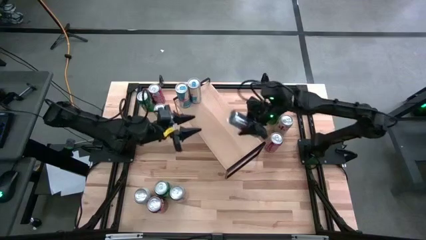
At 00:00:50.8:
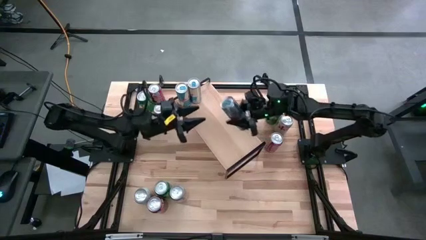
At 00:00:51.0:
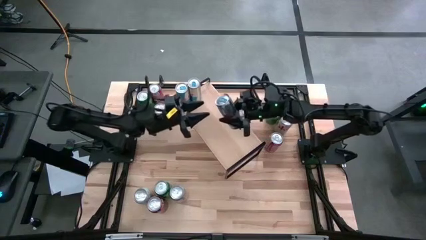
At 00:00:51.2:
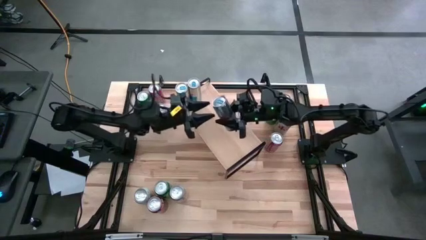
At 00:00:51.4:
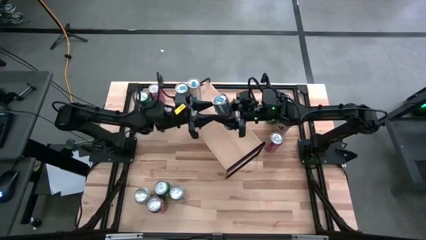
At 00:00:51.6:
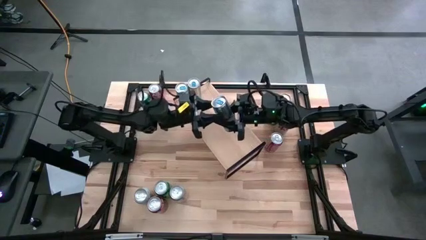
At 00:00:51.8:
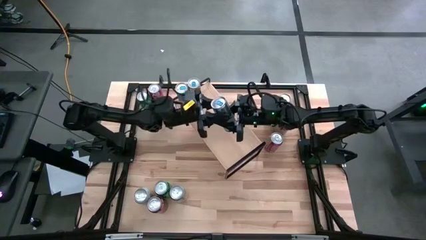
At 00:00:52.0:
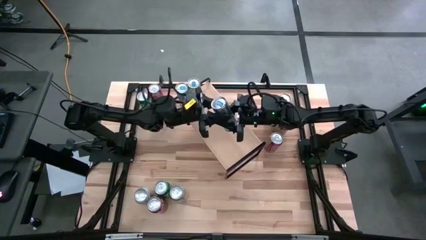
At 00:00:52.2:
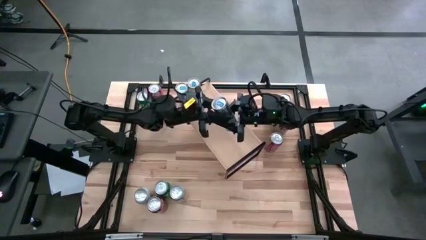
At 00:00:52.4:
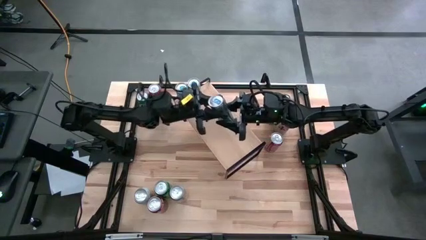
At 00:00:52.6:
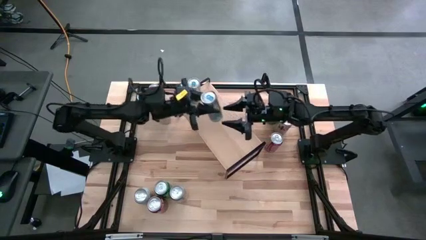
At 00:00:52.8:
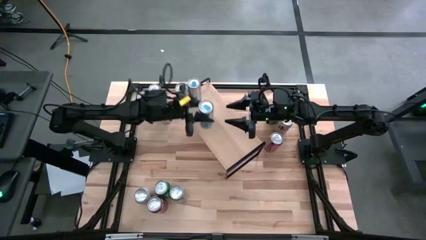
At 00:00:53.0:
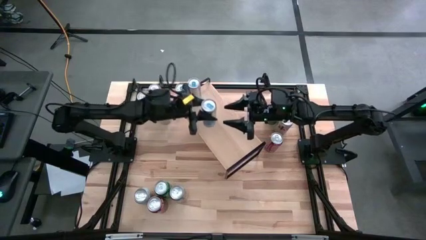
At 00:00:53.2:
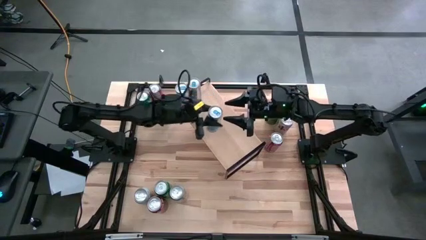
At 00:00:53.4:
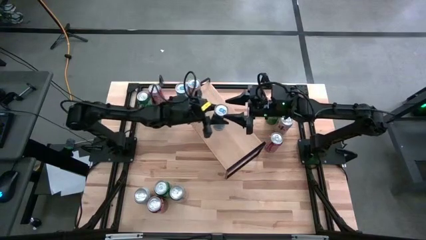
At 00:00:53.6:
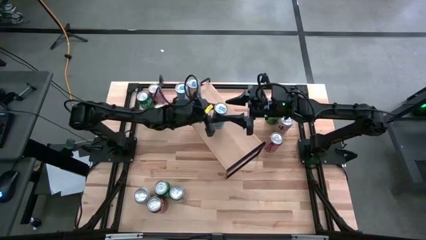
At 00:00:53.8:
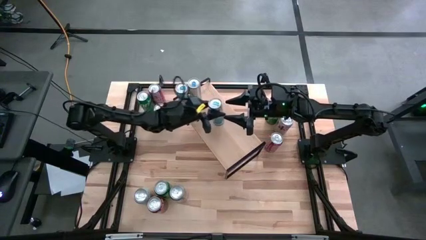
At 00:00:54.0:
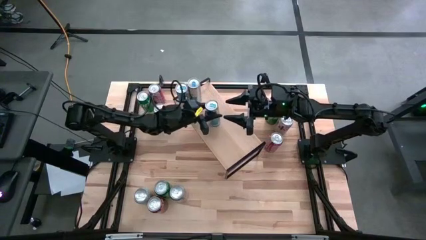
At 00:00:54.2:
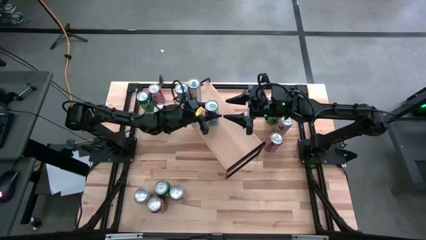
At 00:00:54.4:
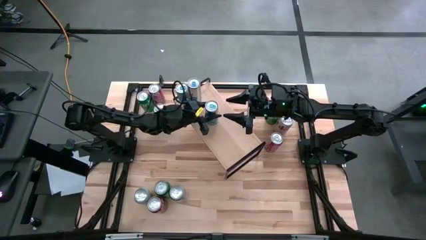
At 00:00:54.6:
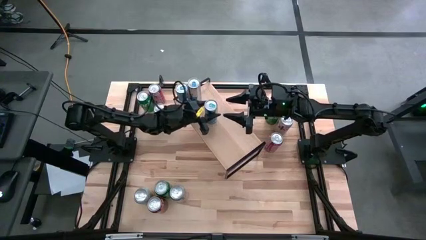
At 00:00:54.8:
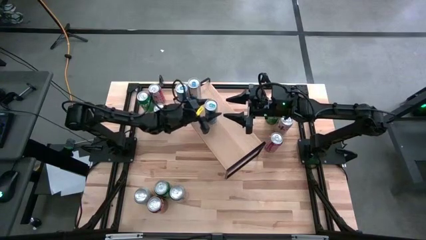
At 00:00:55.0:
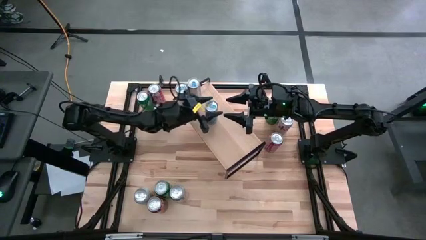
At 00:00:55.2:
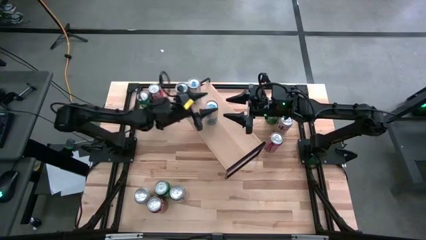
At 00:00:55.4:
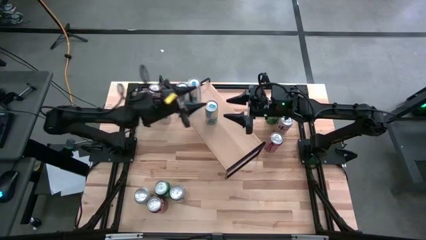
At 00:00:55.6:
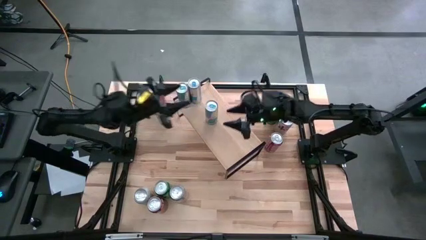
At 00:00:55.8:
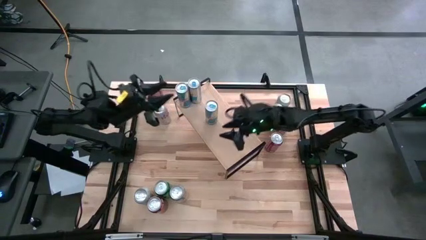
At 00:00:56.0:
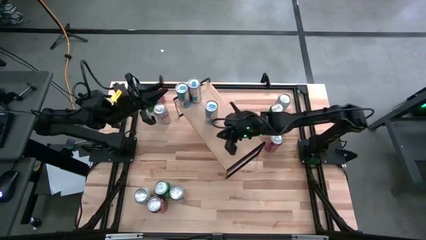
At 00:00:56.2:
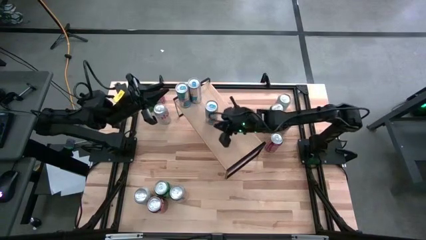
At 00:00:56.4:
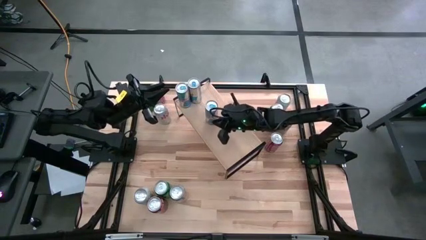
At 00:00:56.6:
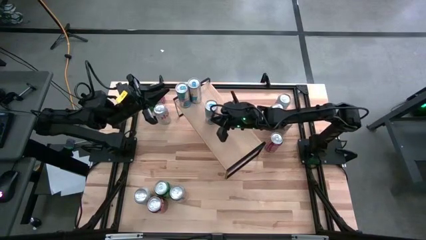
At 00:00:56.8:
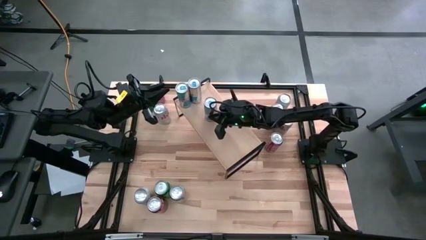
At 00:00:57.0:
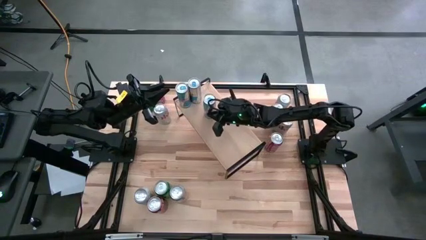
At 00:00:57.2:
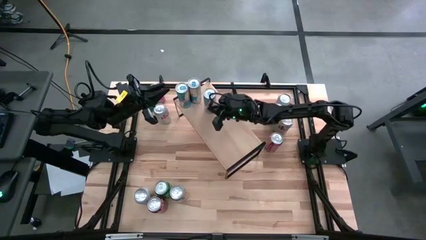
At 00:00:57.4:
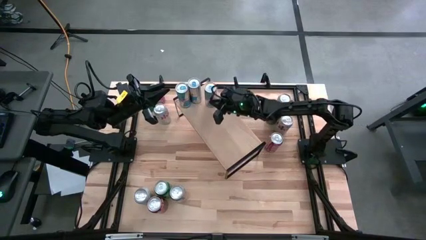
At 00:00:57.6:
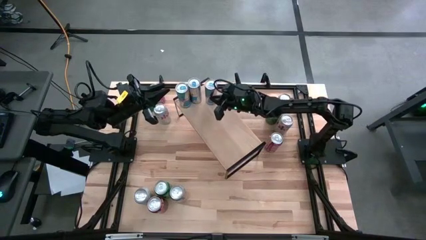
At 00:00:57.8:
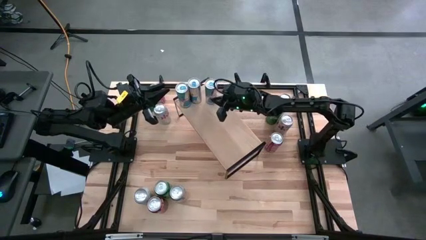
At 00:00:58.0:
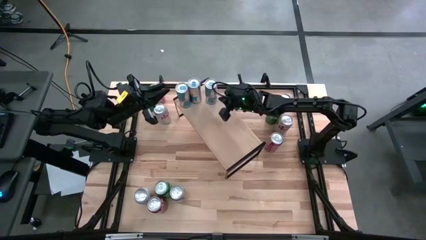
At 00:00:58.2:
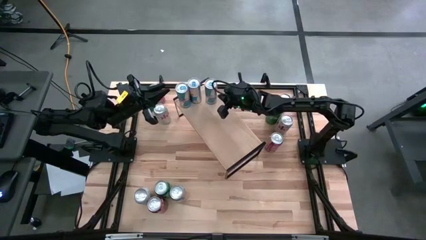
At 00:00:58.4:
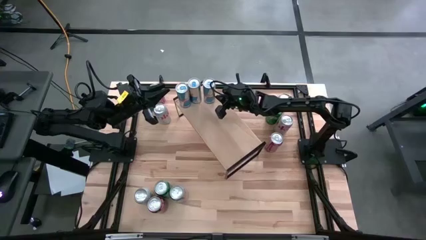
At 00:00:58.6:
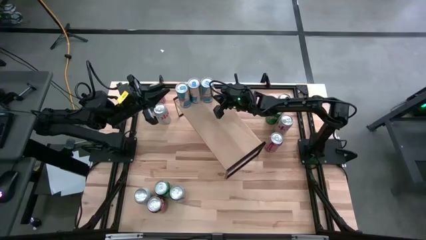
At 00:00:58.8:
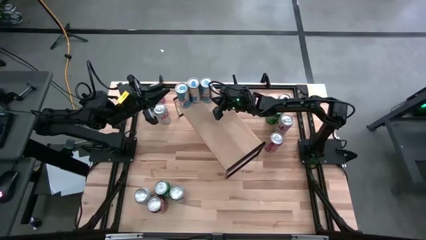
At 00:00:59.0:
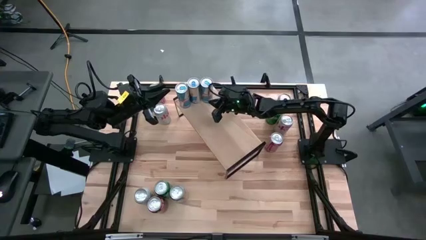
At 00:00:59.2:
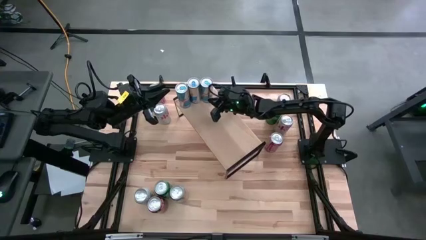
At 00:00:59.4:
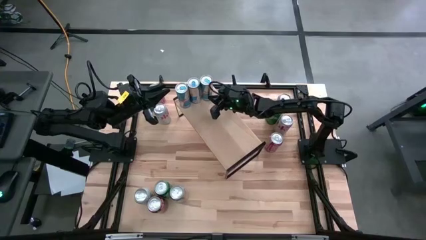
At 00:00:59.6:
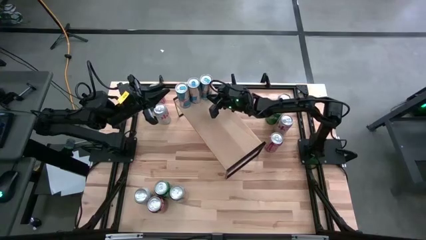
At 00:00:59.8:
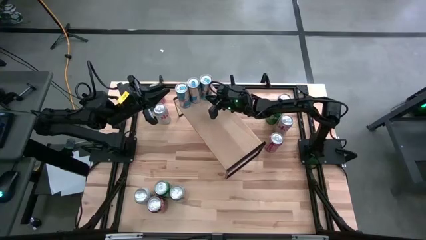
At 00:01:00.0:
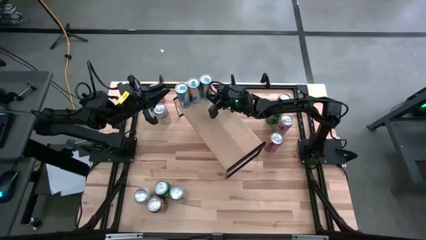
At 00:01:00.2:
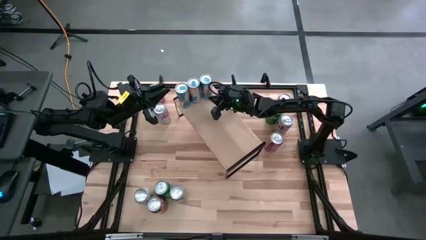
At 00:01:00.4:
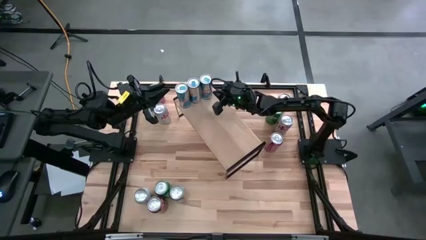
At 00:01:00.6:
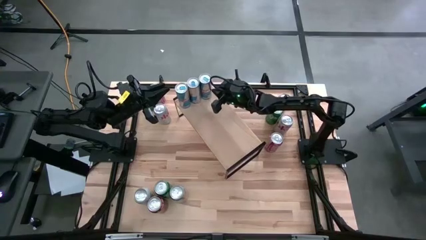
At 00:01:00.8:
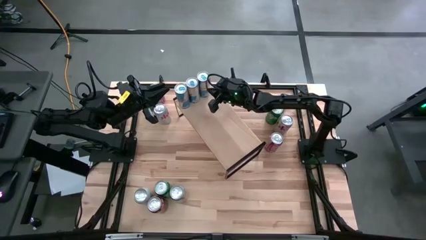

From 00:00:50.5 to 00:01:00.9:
Task: Place canned beverage on shelf
Put the blue soda can on the shelf aligned with the other blue soda cans
